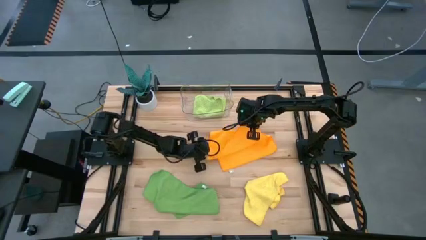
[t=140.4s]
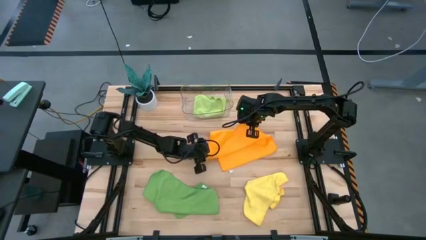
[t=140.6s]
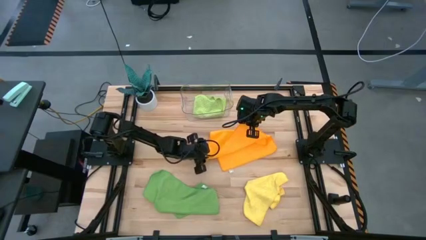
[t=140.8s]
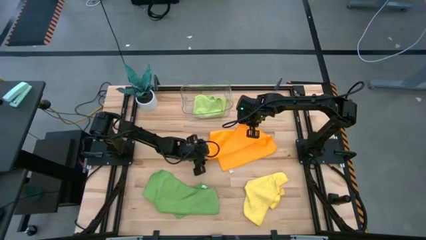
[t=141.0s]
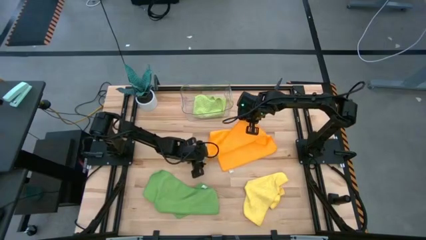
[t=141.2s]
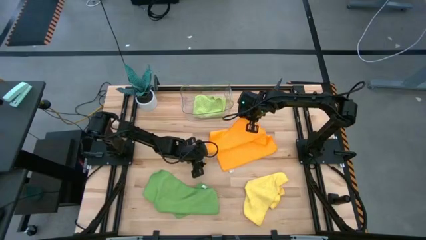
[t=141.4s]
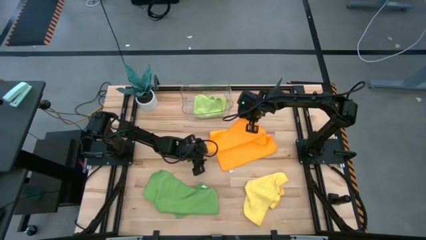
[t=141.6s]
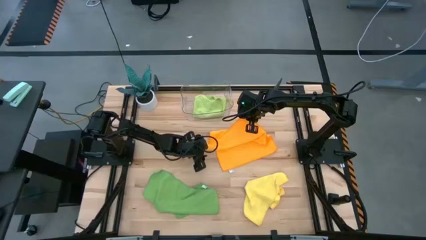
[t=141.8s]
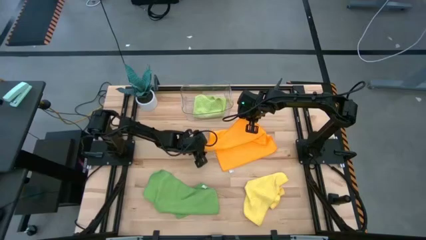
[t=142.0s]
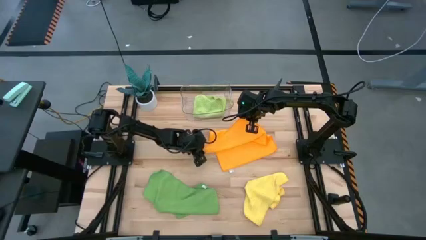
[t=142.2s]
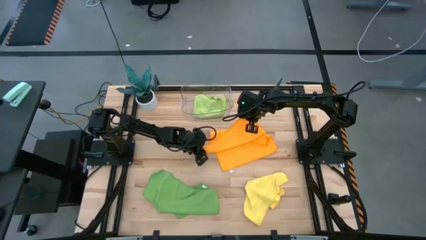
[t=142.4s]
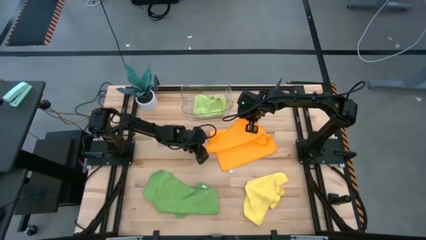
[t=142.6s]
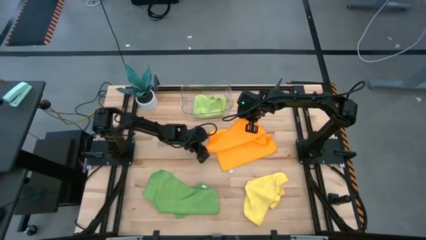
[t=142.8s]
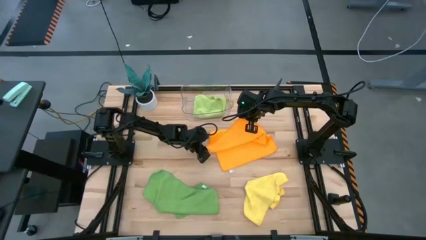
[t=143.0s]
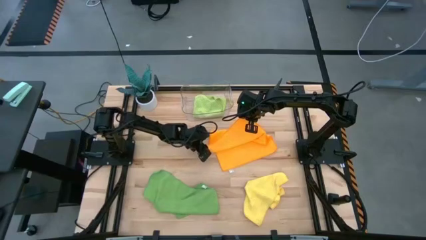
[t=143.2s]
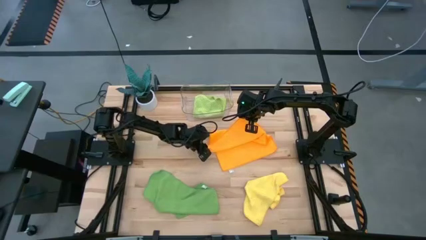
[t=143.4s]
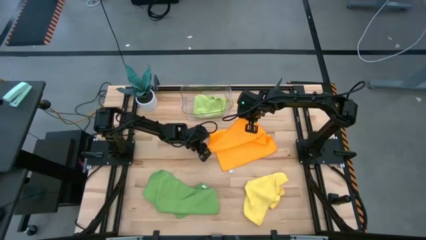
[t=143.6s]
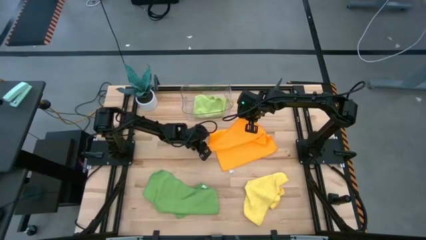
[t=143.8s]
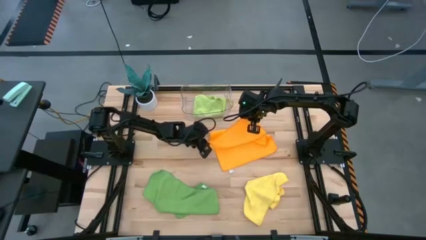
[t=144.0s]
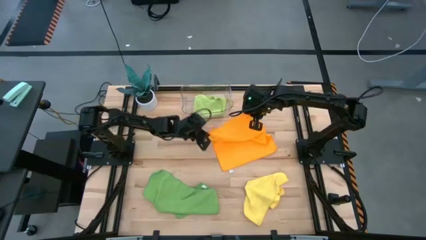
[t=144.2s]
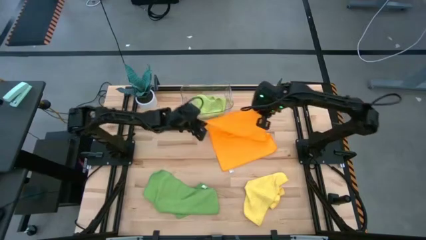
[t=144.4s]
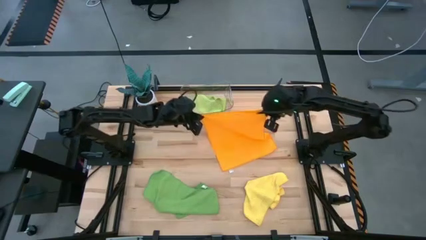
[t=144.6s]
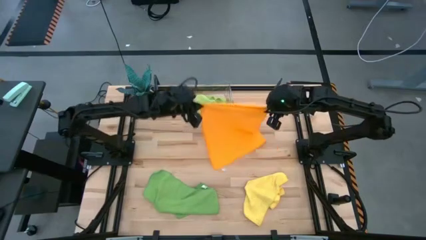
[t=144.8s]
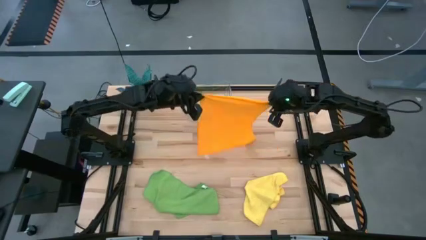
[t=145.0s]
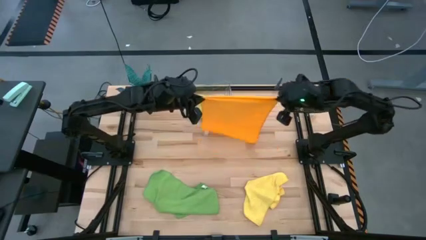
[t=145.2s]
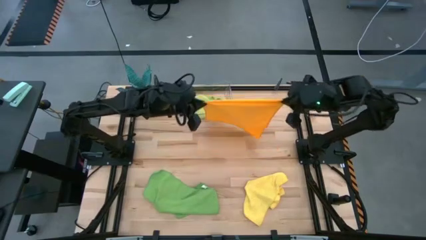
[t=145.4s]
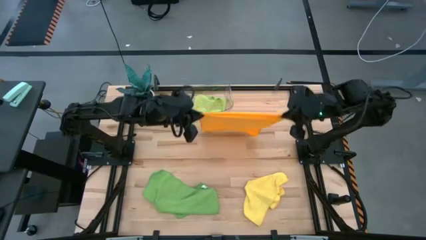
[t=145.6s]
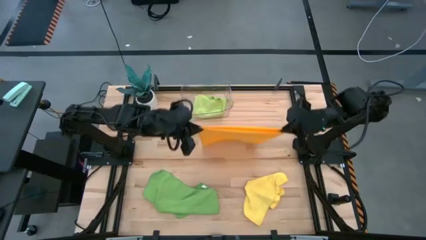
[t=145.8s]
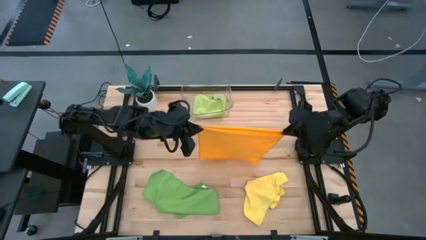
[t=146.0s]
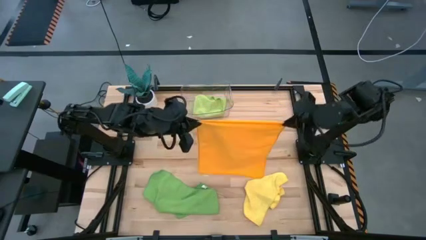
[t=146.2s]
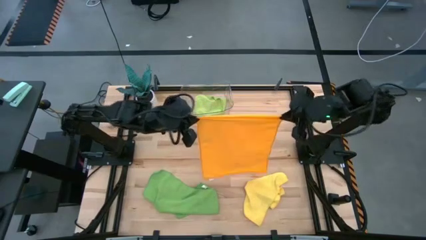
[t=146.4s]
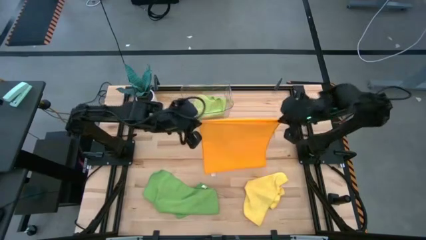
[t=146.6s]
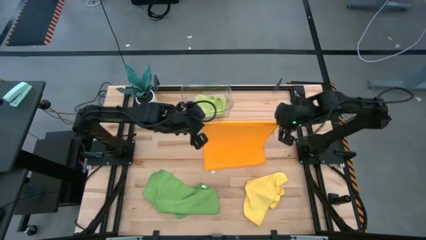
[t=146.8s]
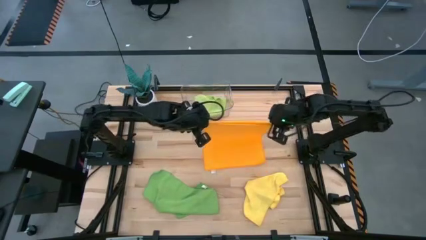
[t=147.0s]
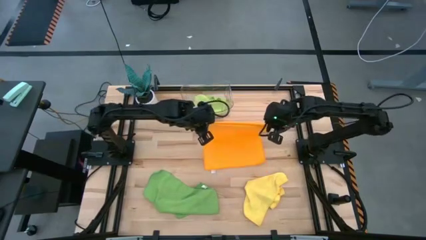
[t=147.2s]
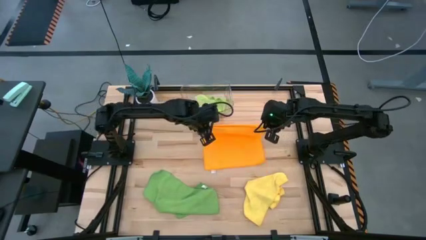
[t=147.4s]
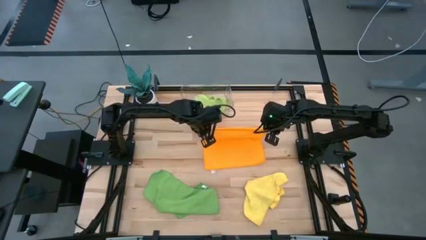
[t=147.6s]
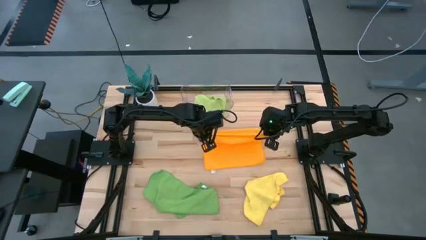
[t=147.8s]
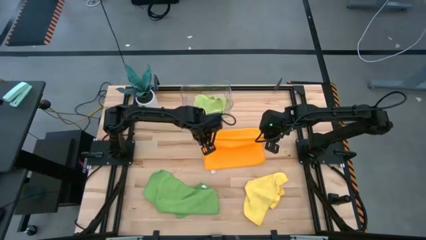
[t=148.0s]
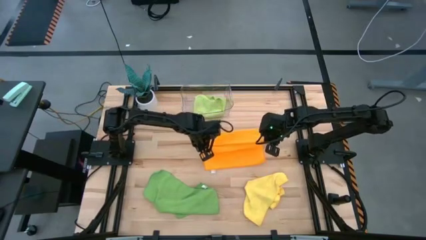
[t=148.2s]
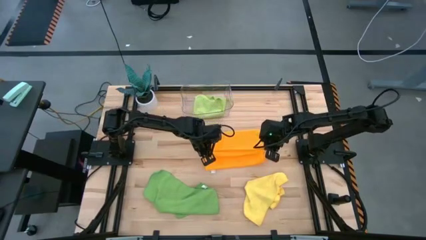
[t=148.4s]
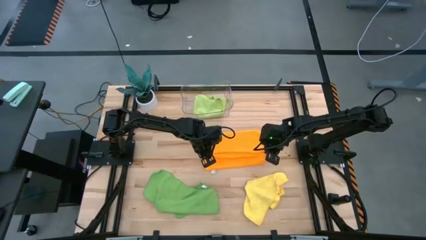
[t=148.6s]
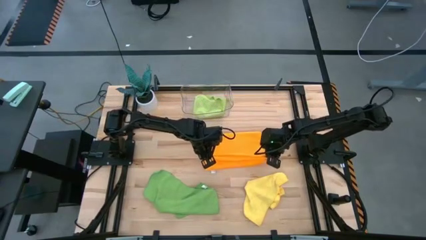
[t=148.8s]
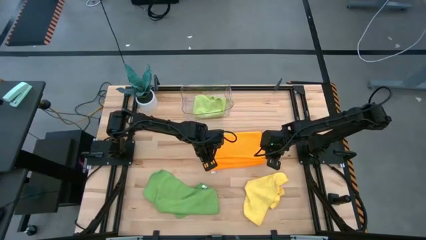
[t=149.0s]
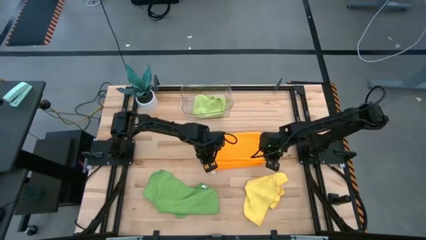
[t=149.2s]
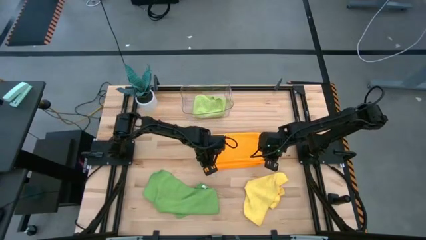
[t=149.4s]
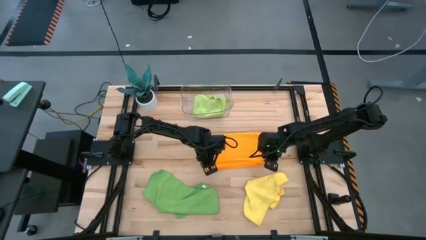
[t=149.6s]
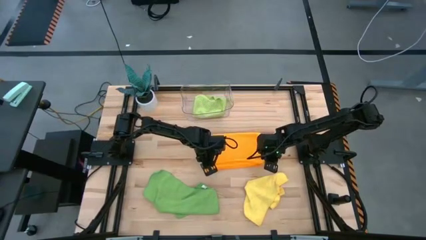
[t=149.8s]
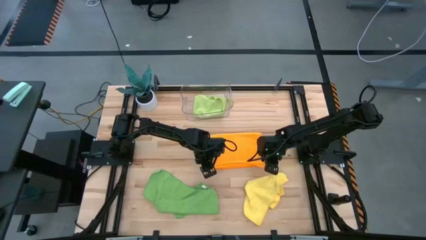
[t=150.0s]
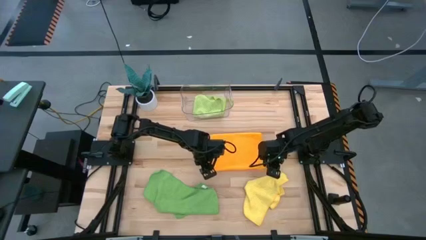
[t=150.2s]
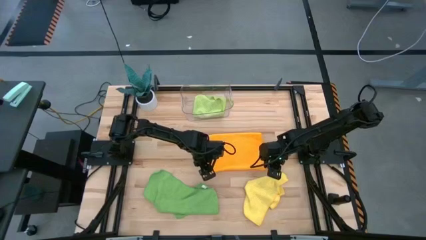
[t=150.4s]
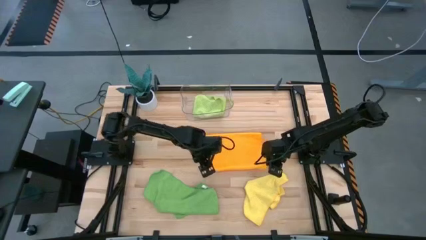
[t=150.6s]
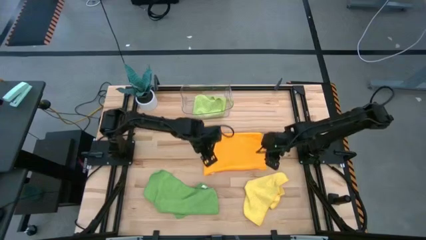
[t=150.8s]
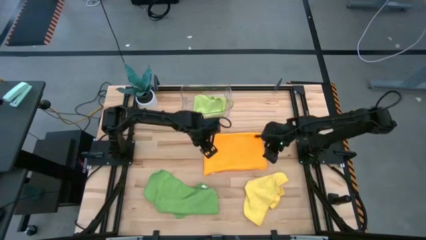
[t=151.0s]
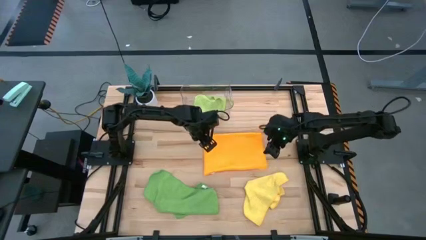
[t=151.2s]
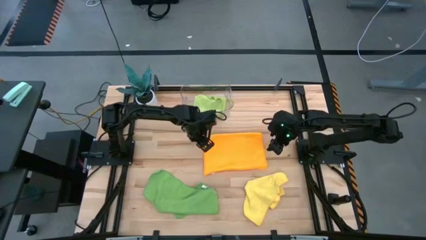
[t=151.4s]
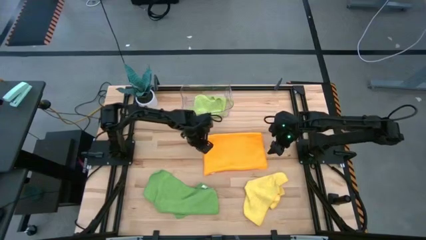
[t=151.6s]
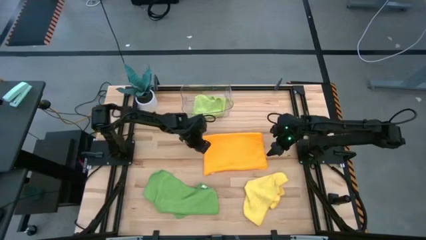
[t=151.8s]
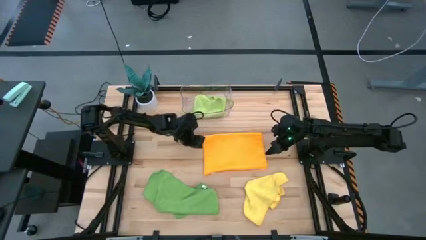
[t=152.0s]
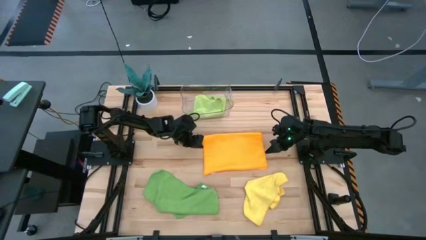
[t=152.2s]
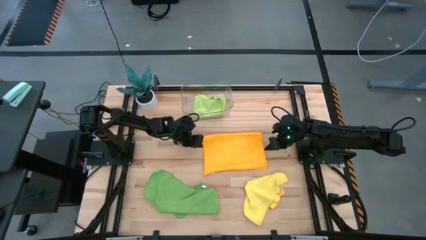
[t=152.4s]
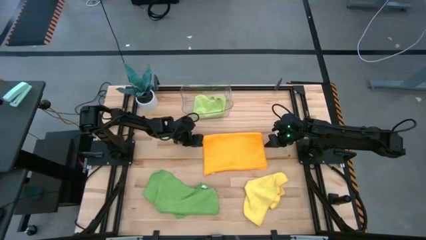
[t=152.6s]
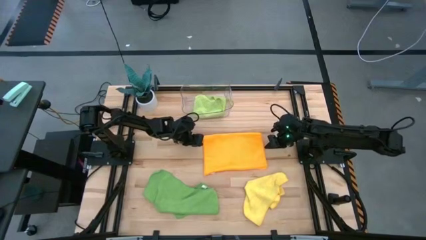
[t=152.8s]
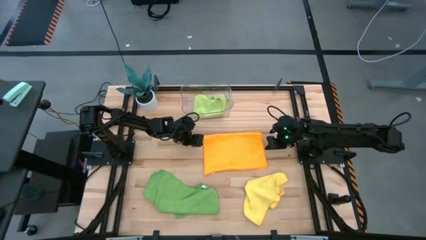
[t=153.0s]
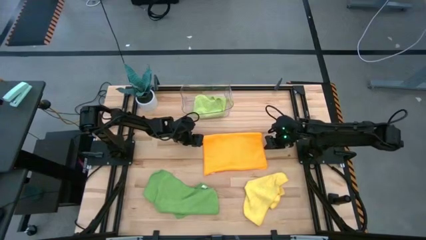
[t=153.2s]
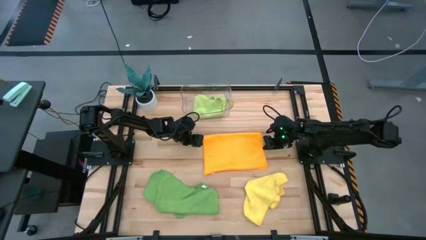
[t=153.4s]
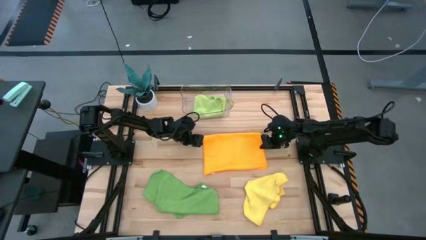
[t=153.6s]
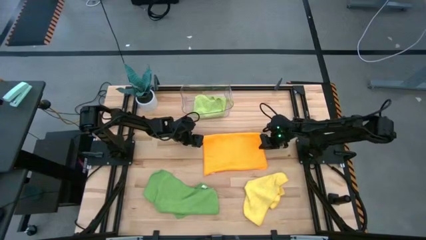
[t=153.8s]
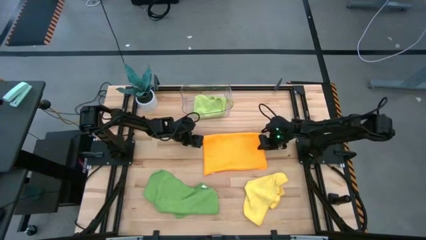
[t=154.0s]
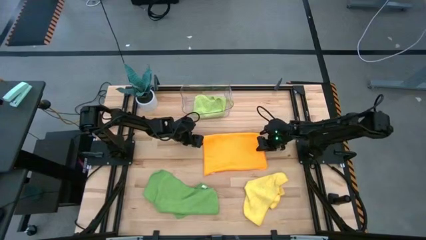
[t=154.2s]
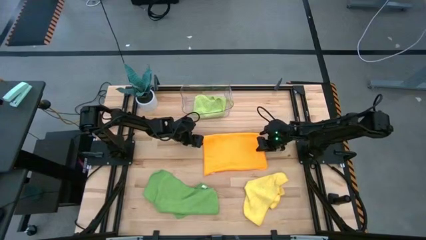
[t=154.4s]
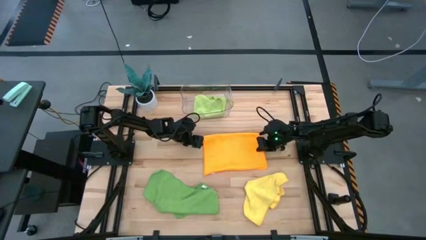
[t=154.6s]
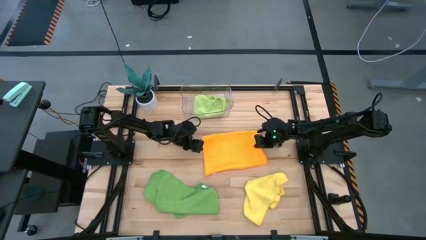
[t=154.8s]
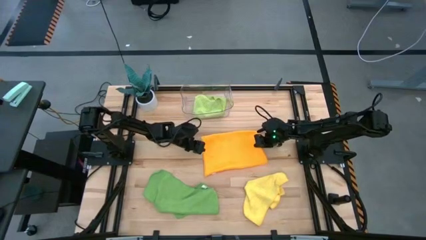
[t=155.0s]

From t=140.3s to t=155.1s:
Task: Fold microfiber towels
Fold the orange microfiber cloth
